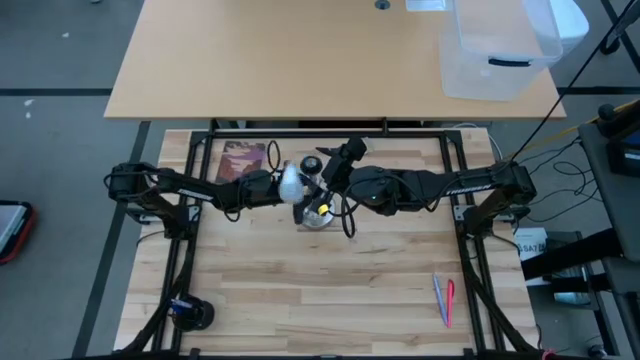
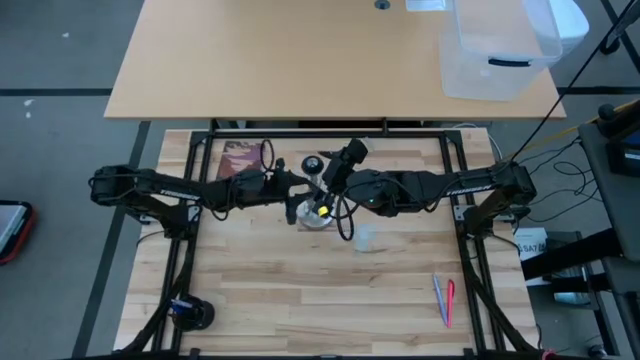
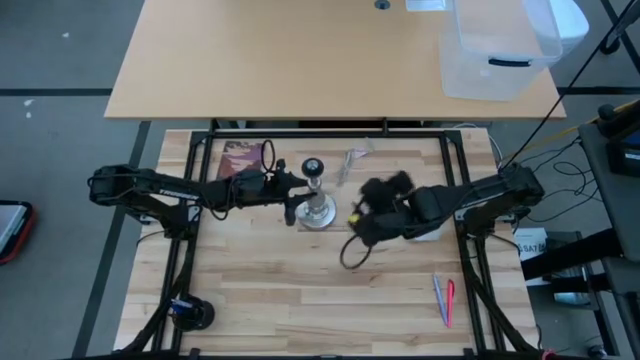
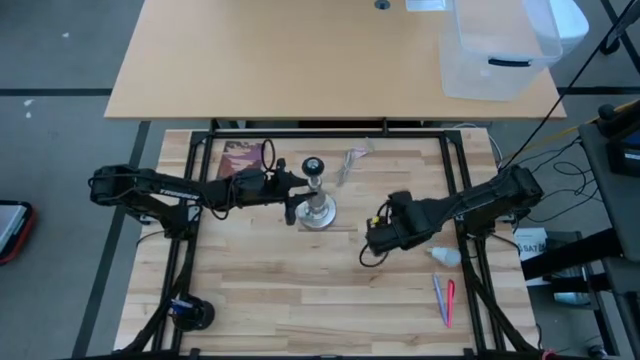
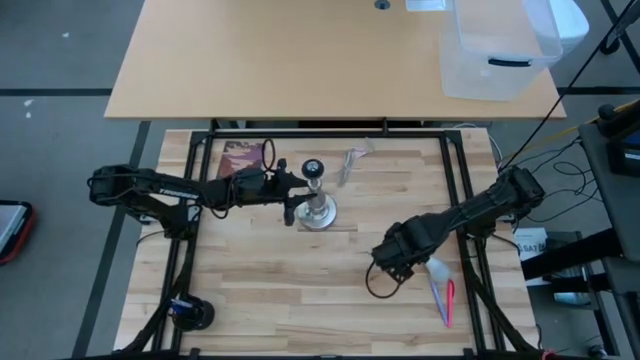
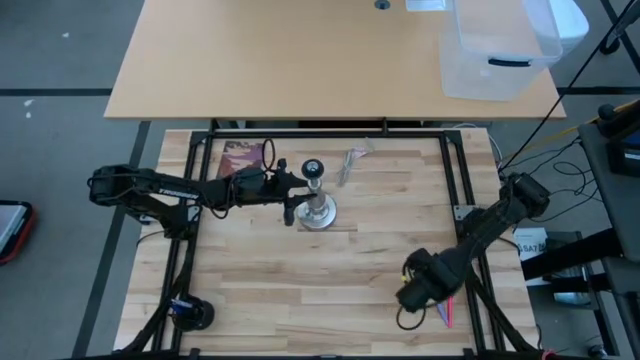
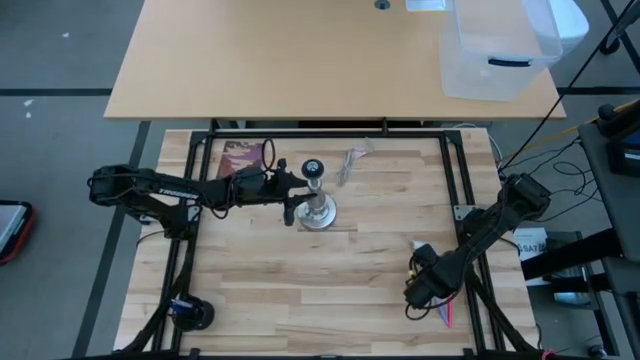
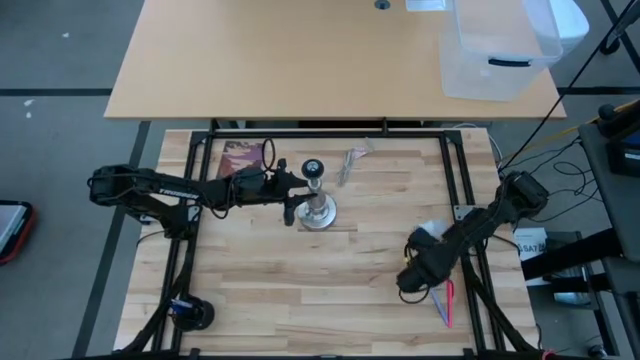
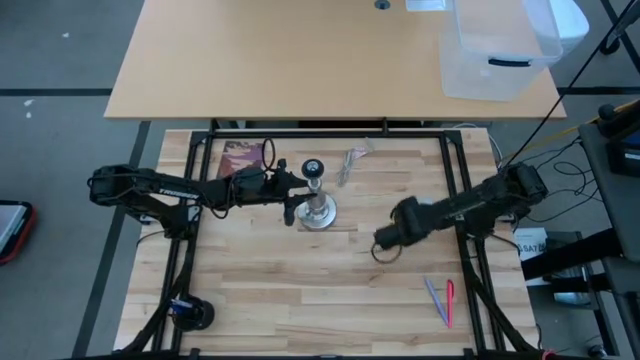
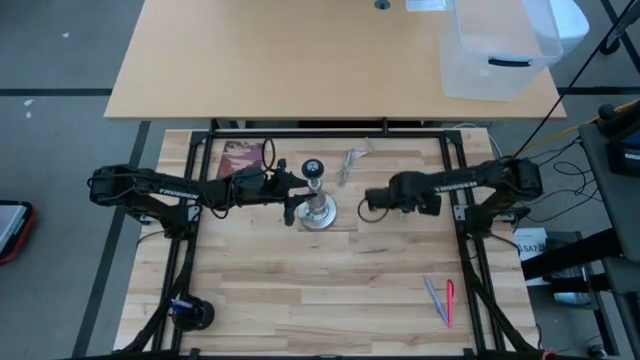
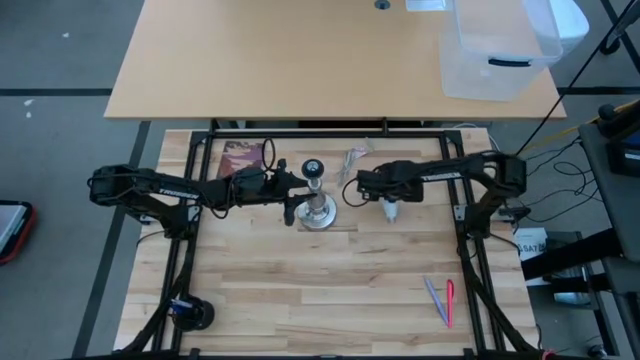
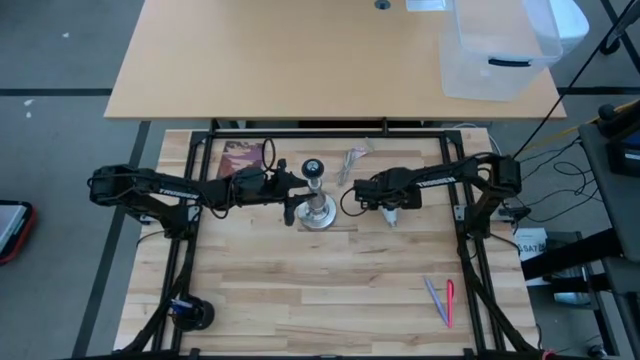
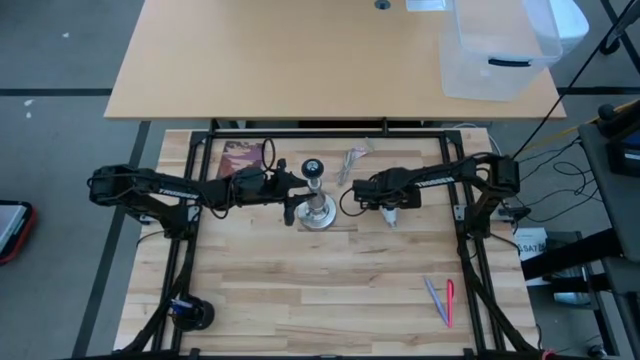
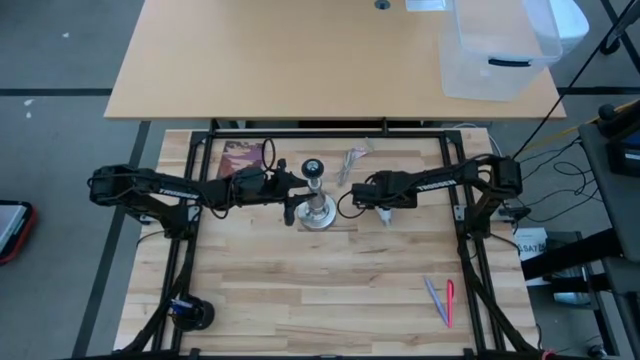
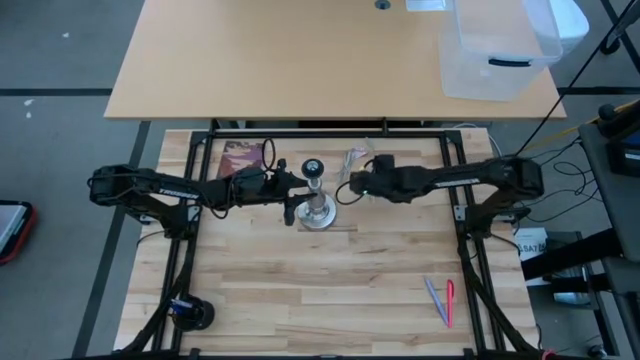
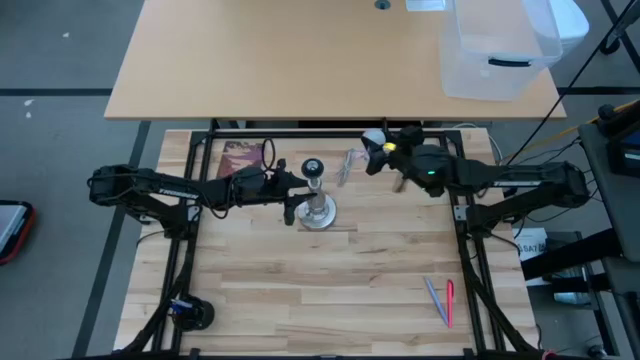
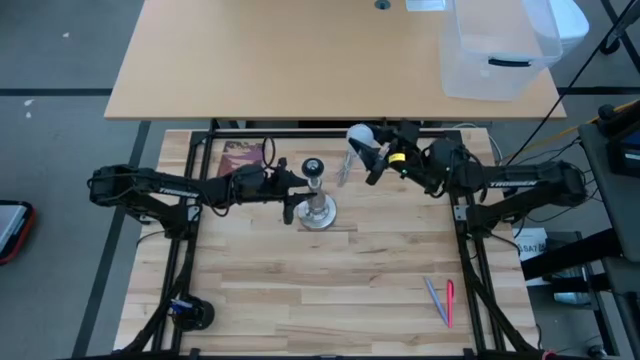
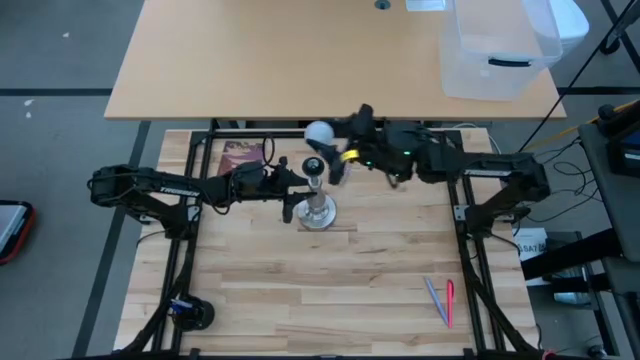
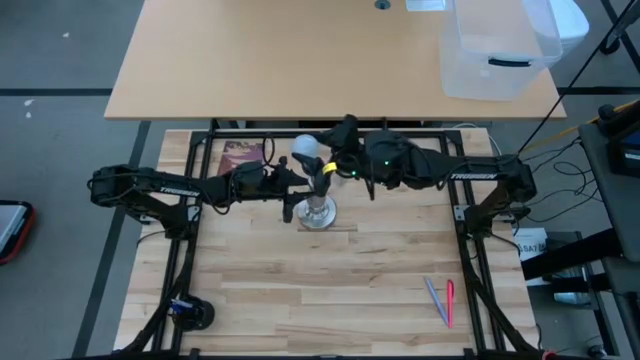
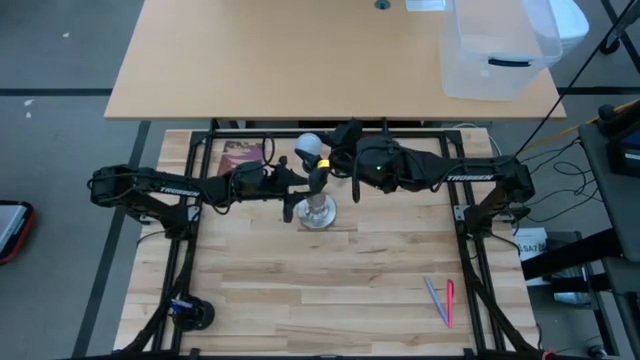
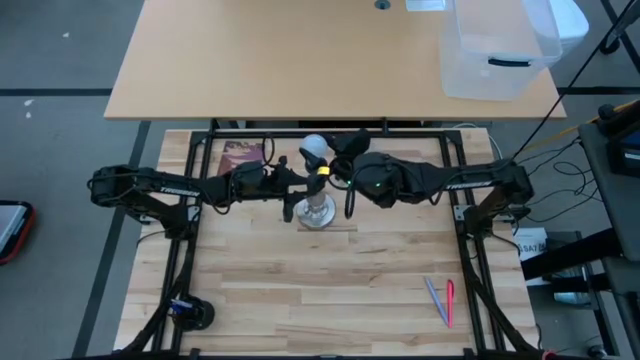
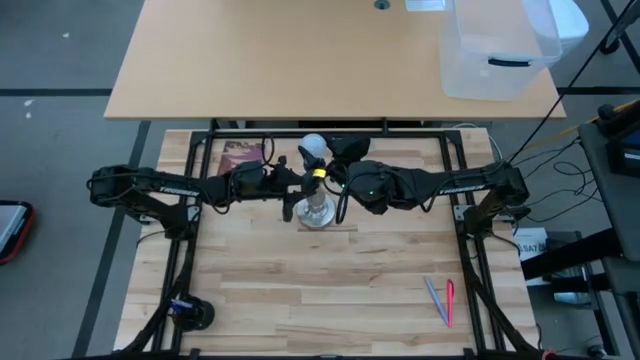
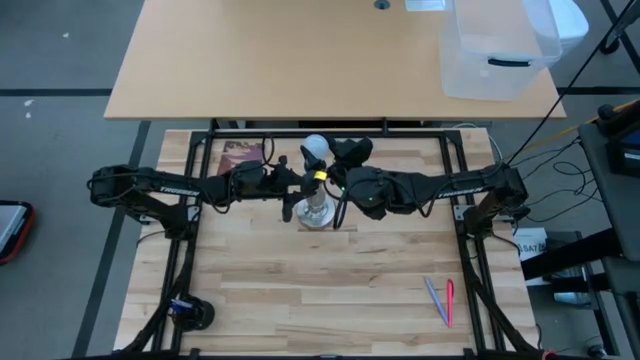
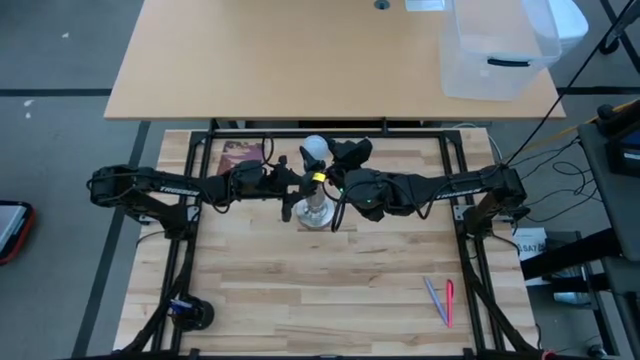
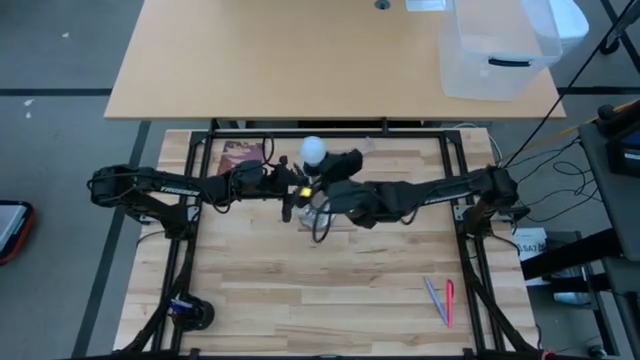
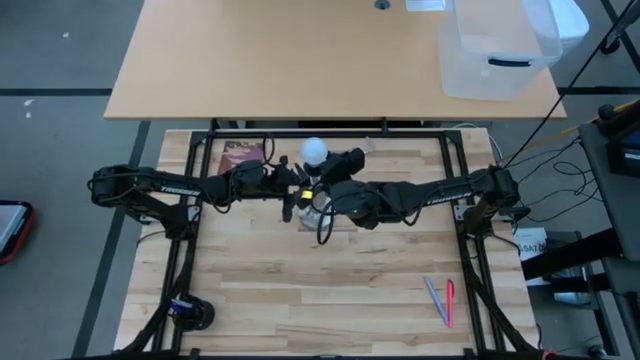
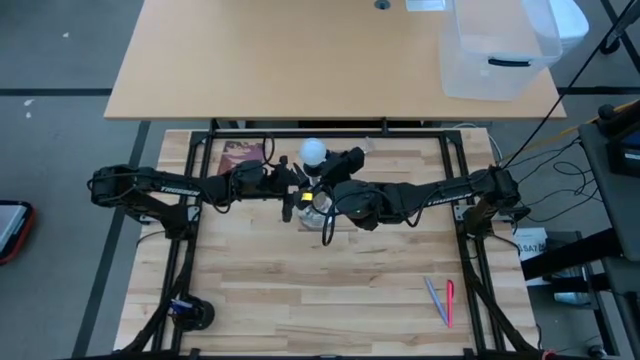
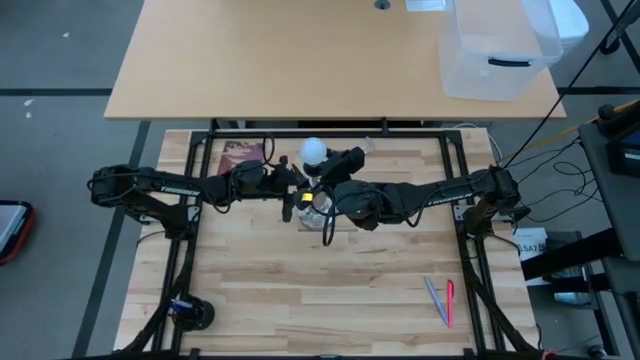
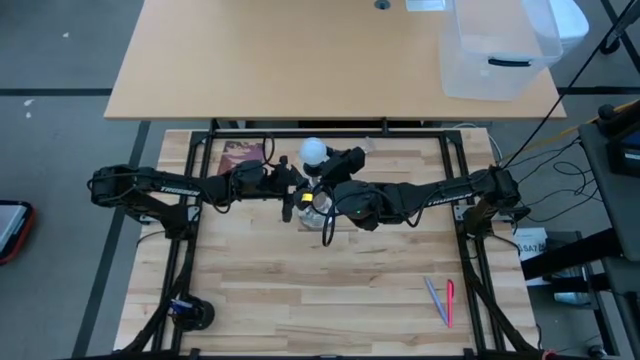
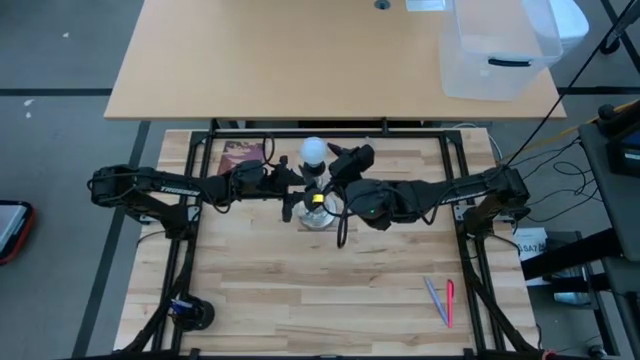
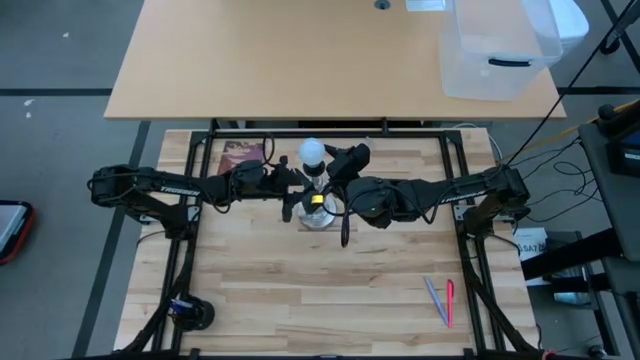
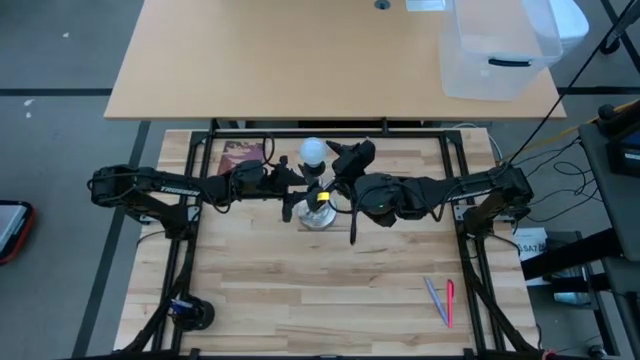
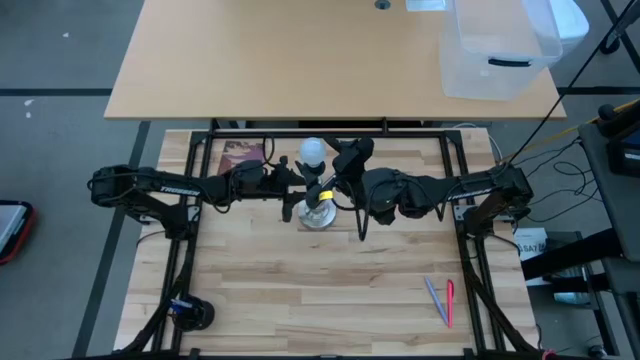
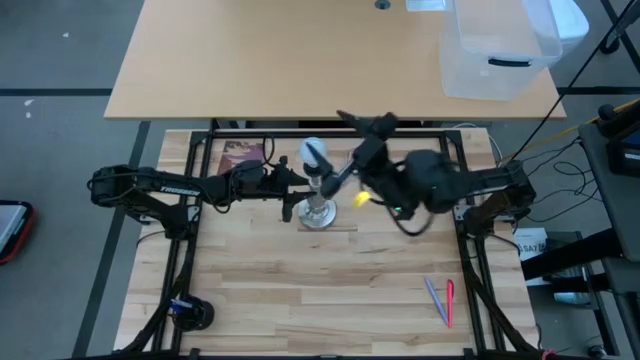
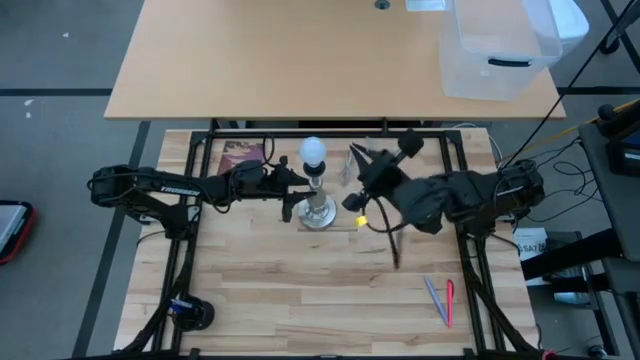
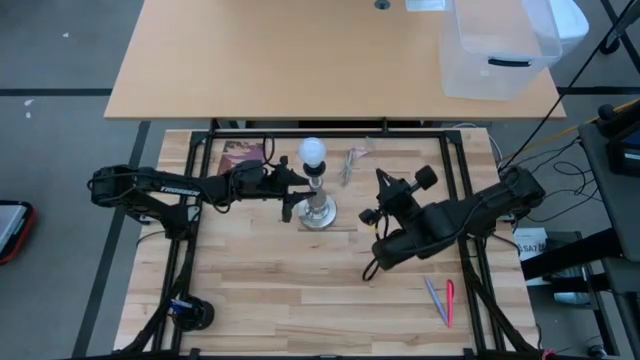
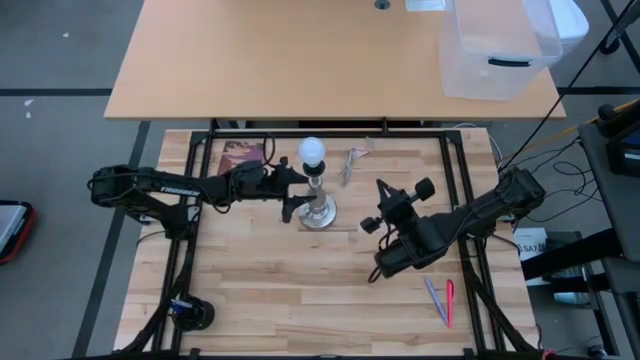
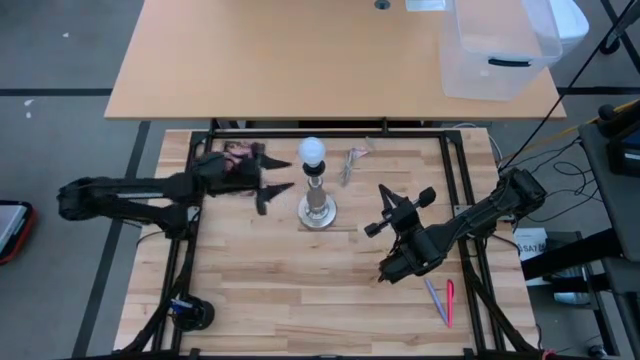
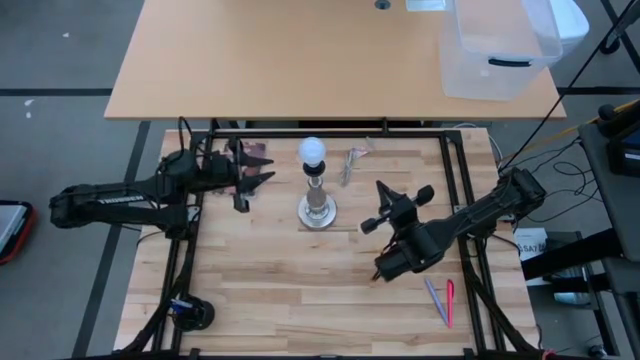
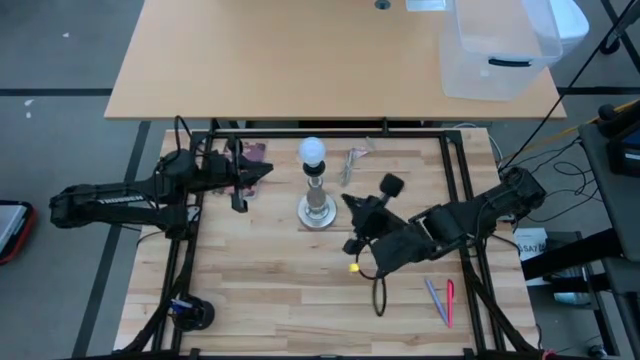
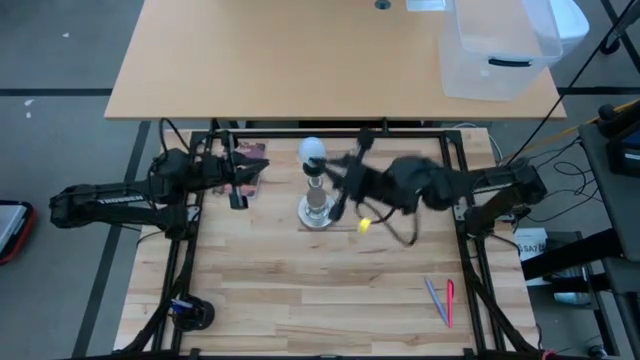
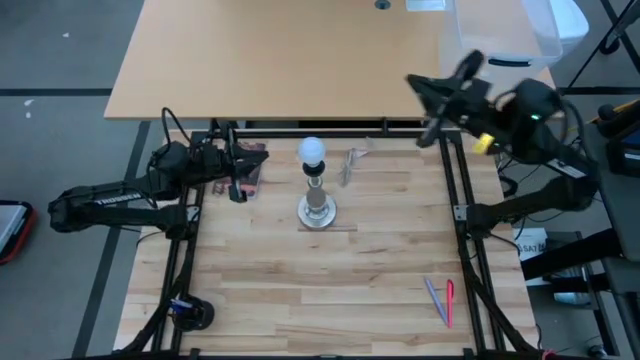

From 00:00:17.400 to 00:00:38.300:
Task: Screw lightbulb
Insert the white lightbulb into the silver lamp
